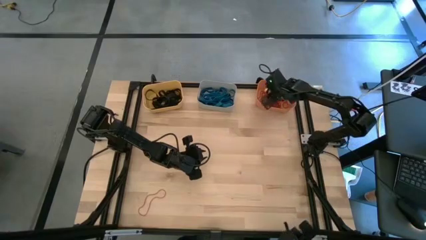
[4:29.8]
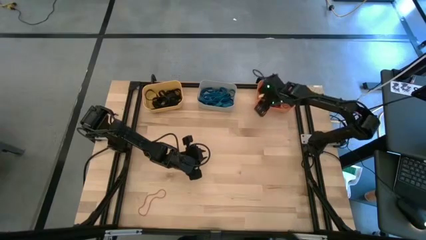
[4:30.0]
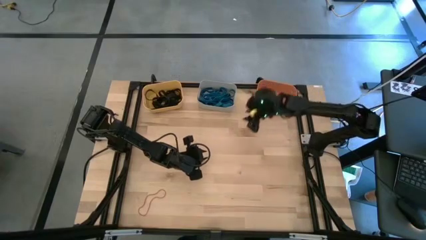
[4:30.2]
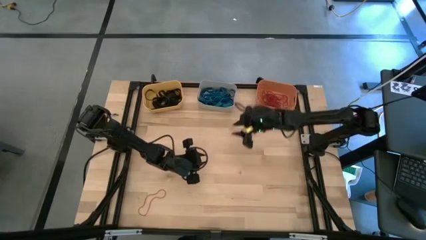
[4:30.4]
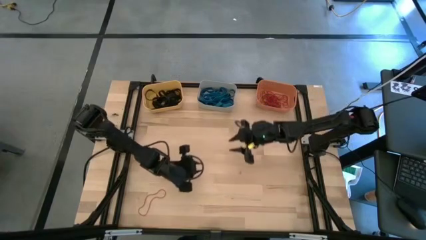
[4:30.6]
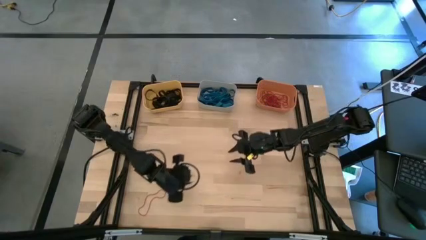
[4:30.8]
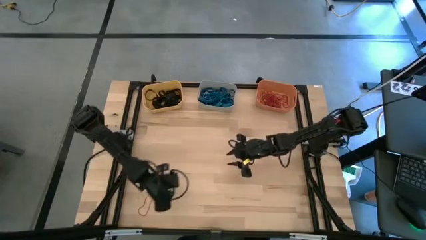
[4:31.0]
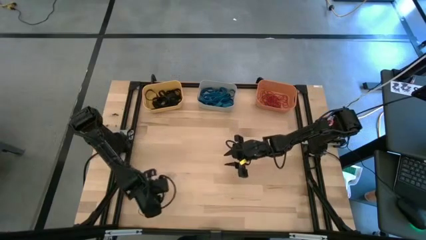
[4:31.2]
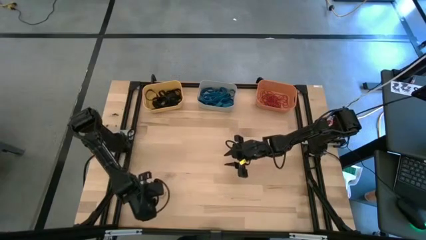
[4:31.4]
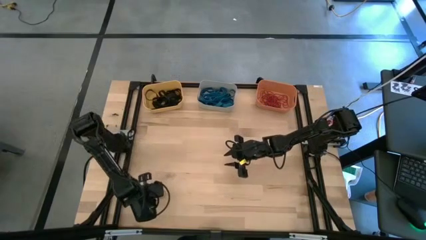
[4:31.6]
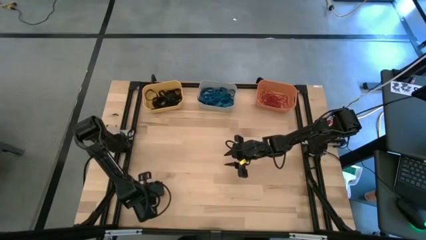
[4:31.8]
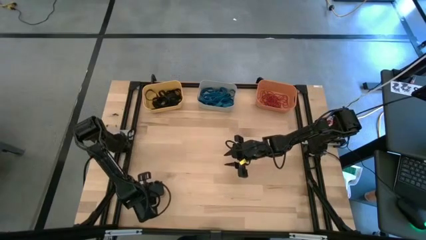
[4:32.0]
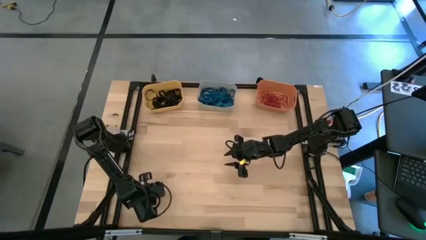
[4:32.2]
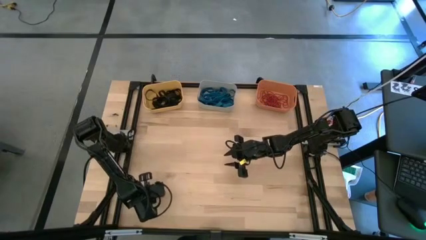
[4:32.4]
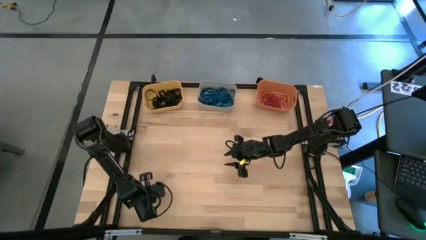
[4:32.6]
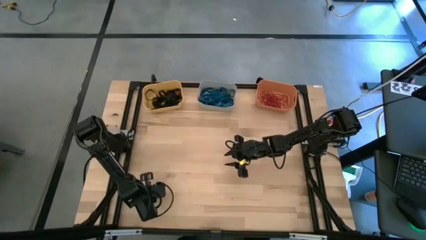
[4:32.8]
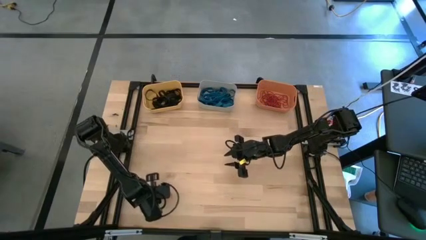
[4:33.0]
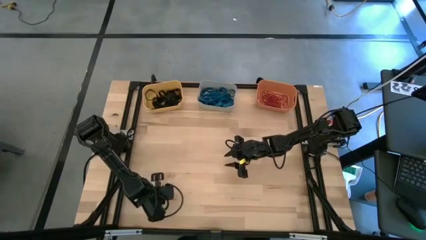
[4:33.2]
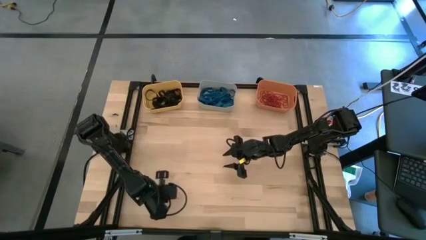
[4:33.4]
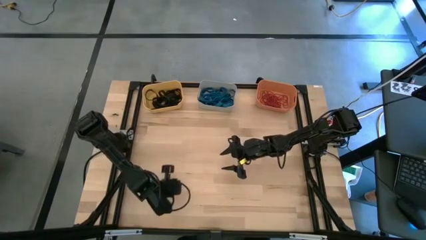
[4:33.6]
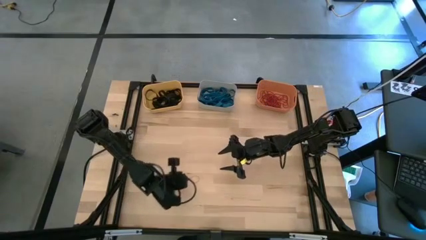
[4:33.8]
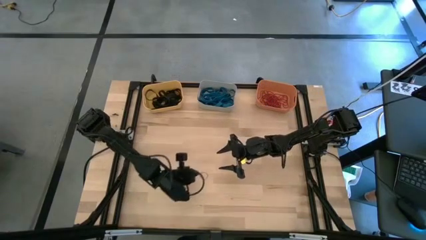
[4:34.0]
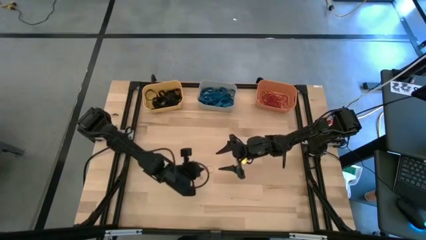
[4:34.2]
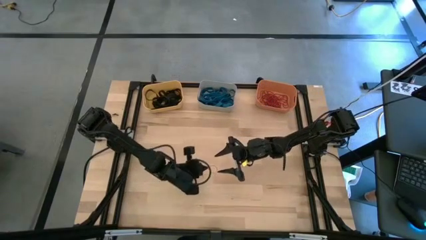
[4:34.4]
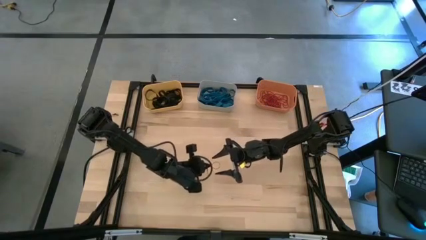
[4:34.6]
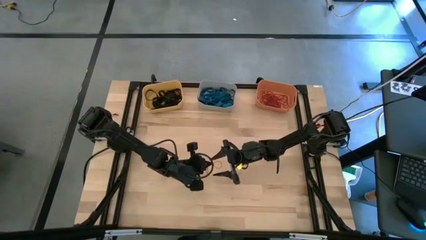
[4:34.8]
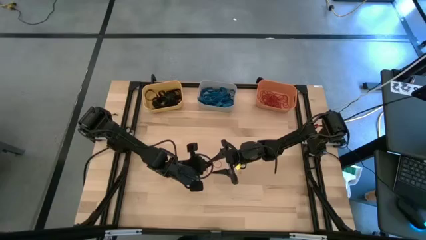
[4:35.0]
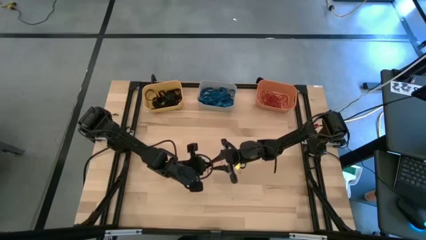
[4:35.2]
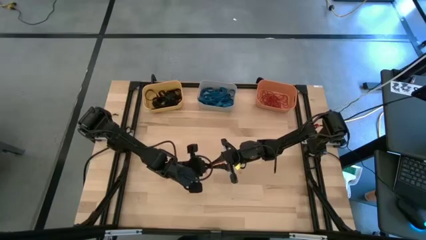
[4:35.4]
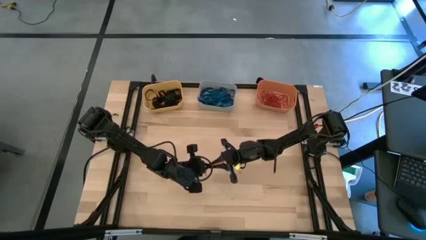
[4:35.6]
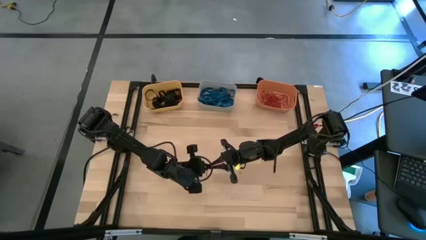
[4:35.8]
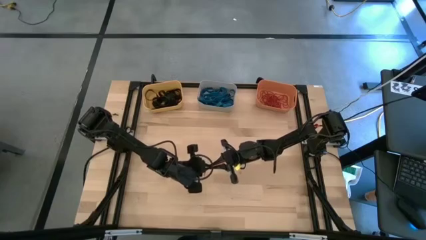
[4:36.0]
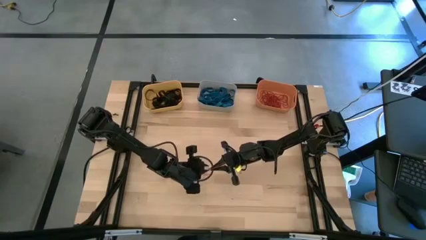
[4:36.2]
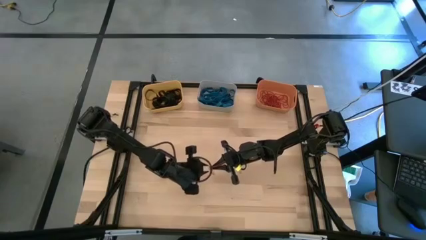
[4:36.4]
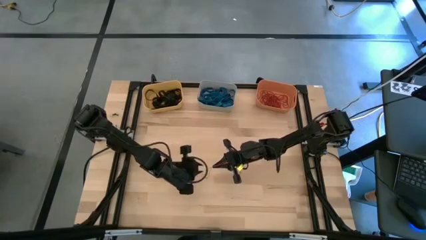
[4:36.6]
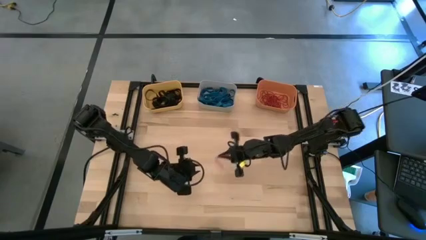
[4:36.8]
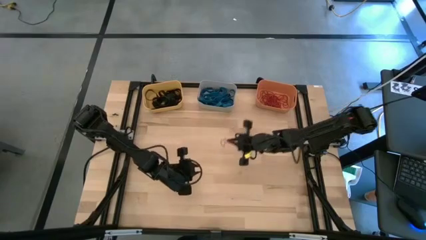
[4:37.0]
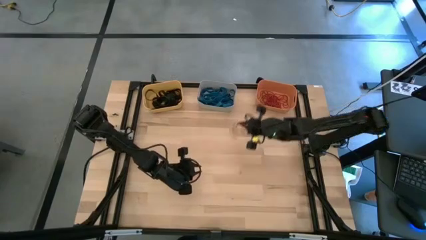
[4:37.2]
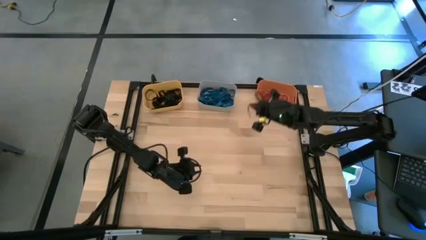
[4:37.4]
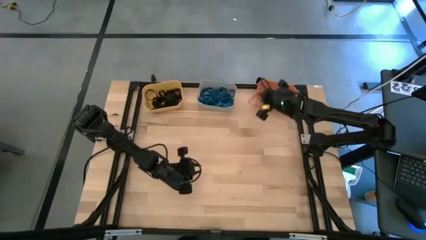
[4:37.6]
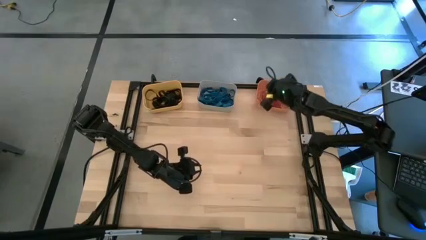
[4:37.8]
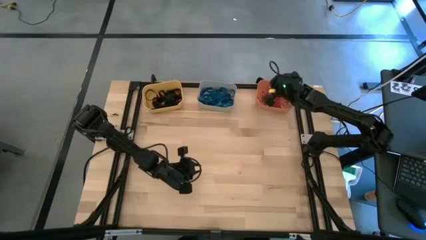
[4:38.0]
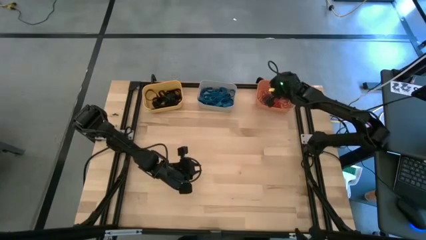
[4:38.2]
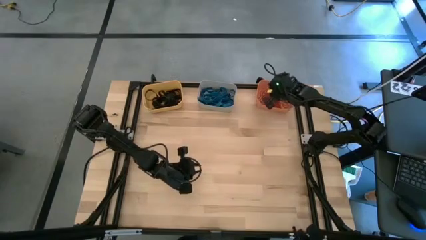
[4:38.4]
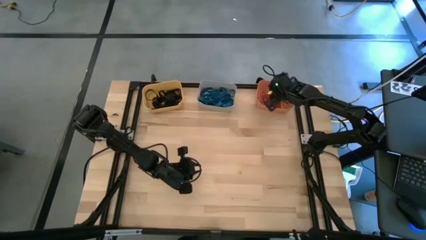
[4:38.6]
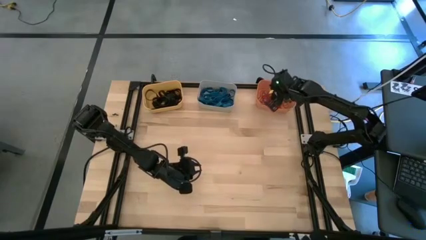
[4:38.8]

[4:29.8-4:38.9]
Task: Sort rubber bands into baskets
Put the red rubber band into the orange bin

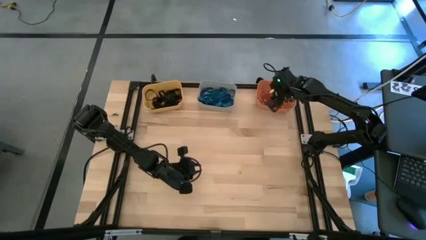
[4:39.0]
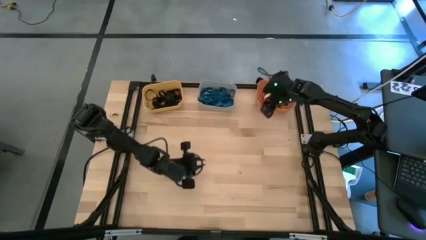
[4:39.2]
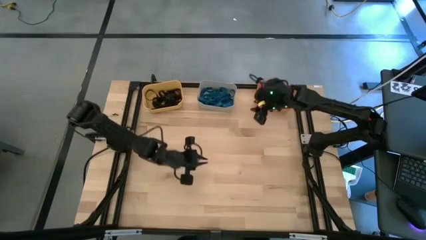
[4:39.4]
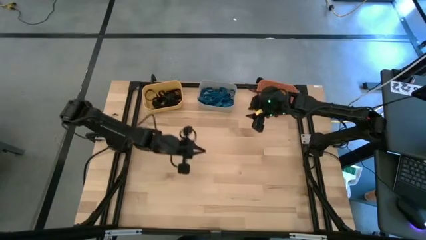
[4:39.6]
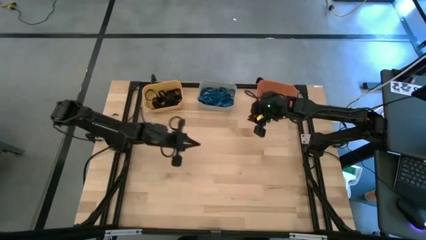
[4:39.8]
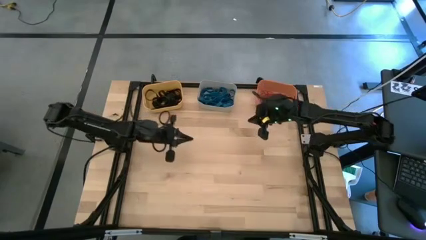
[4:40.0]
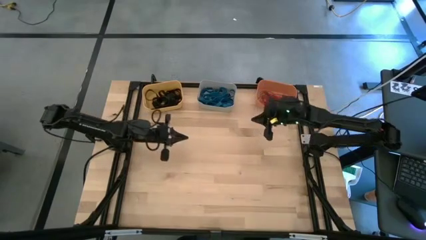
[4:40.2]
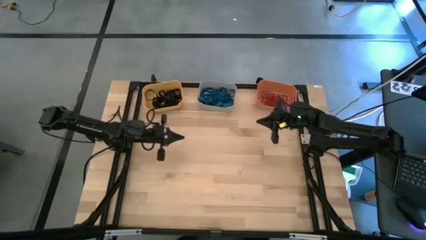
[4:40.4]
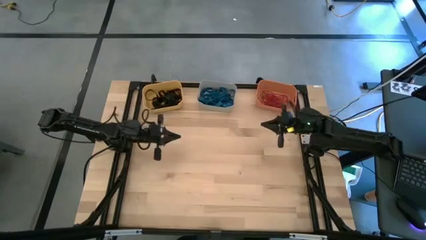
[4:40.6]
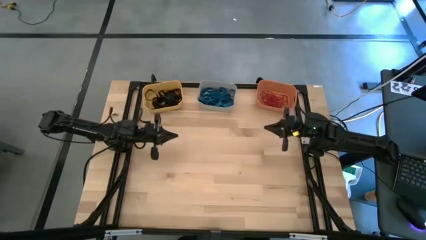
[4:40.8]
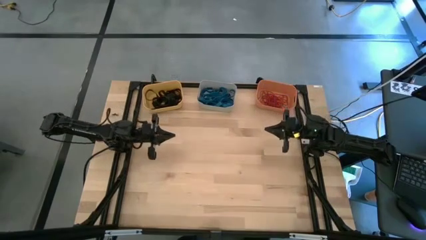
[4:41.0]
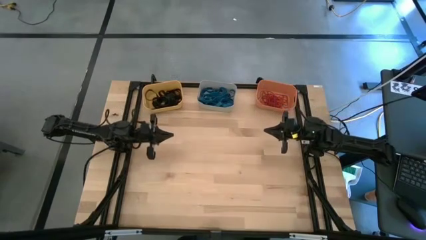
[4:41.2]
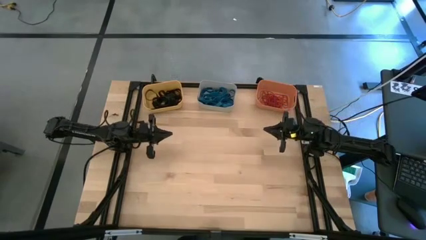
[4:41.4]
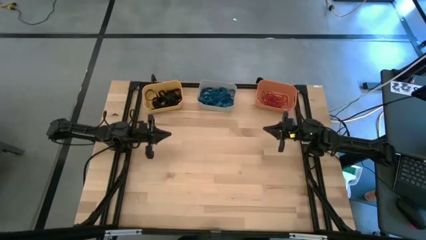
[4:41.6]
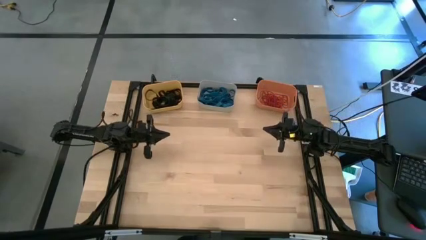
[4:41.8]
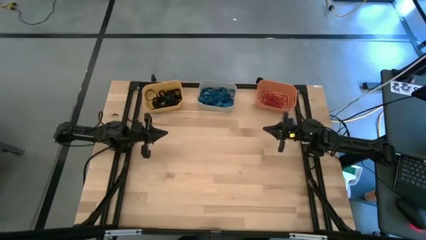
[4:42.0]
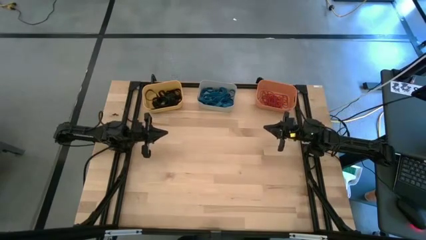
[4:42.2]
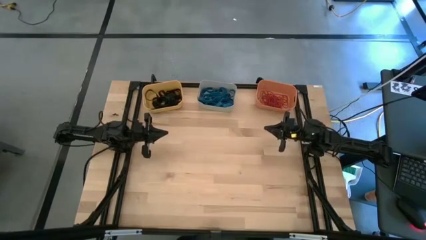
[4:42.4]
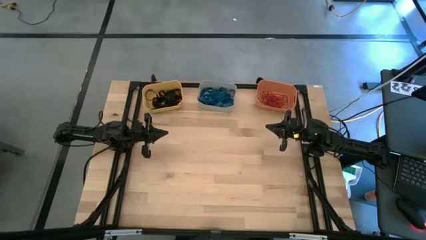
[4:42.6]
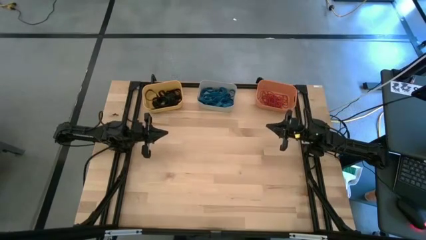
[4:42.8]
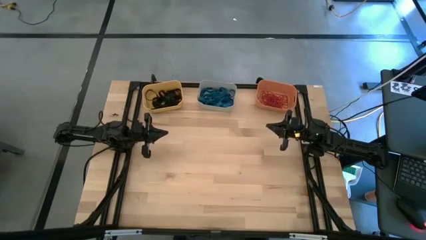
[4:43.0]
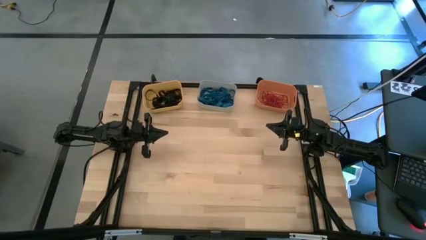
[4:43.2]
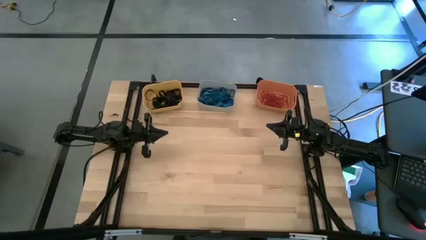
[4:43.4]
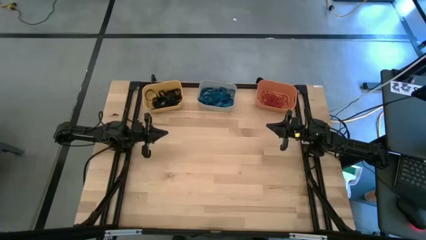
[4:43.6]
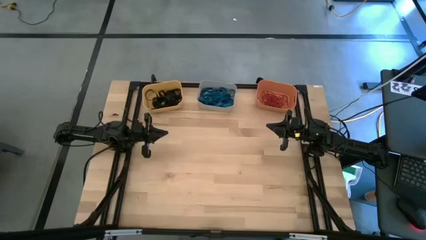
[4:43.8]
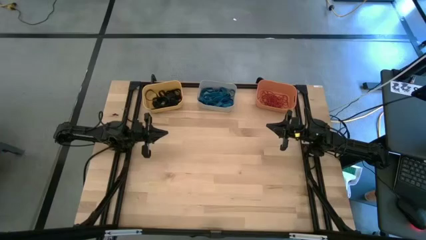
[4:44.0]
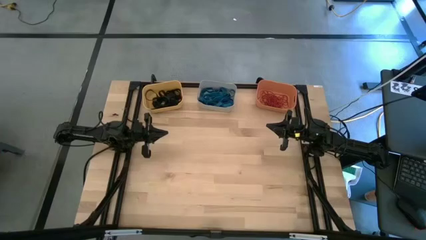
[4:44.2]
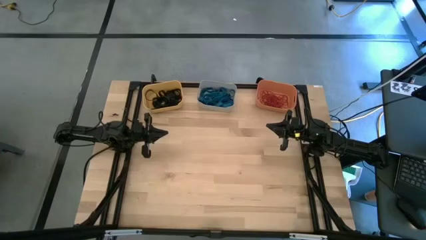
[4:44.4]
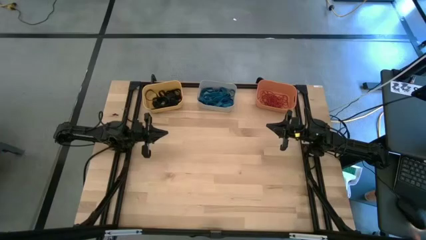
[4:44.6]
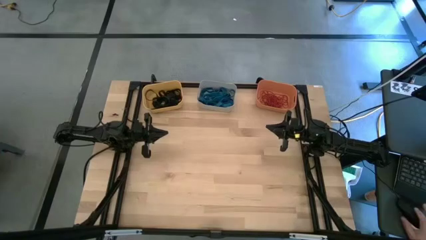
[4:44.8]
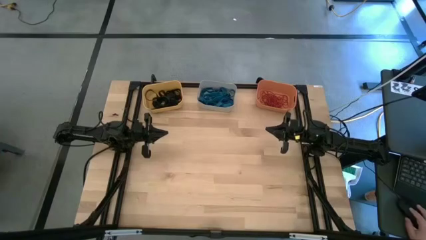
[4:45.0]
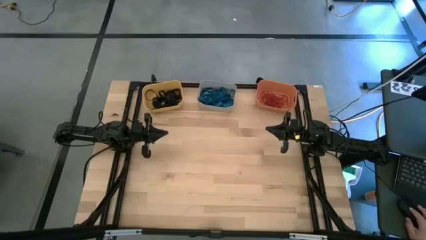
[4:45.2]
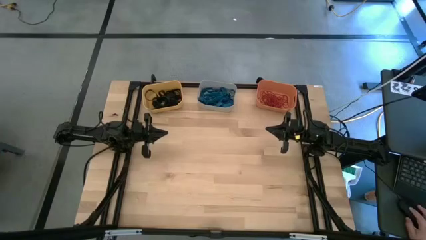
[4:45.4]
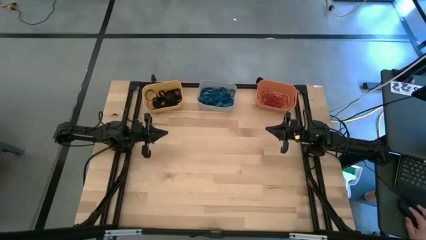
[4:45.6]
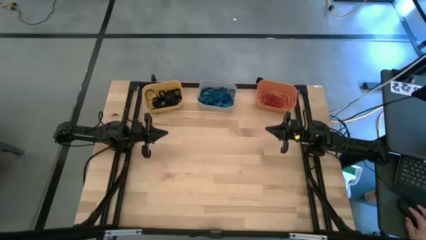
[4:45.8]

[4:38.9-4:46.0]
Return to Home Position

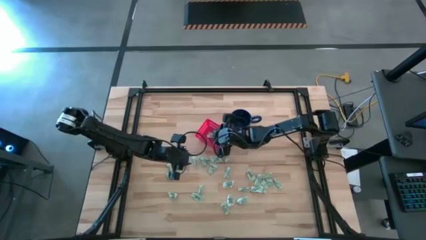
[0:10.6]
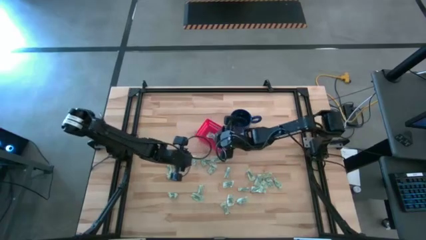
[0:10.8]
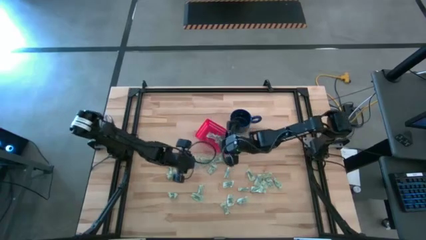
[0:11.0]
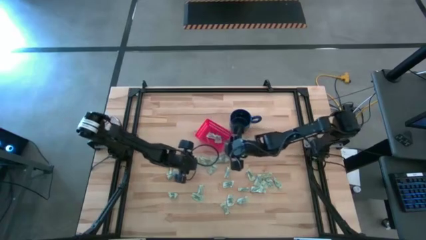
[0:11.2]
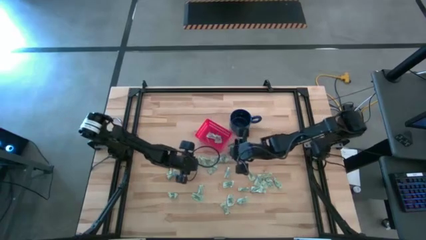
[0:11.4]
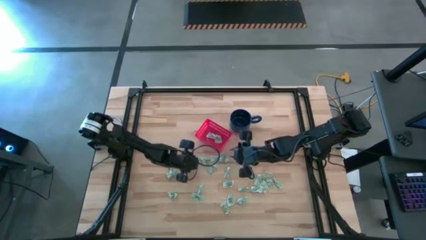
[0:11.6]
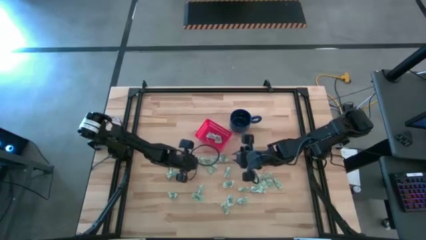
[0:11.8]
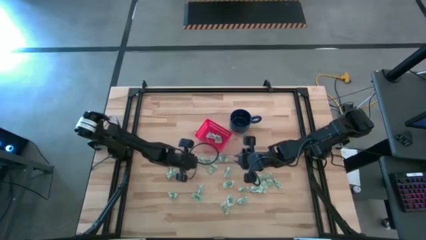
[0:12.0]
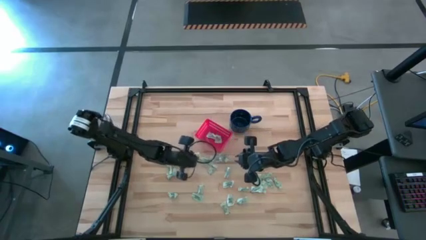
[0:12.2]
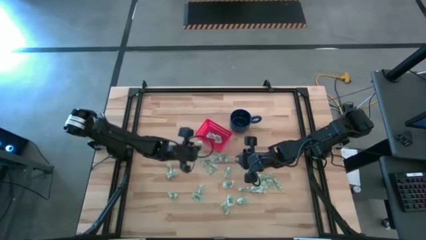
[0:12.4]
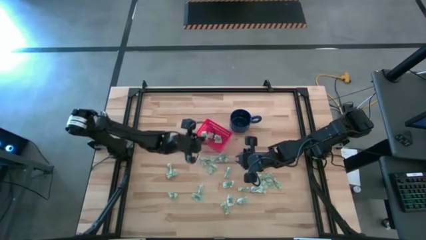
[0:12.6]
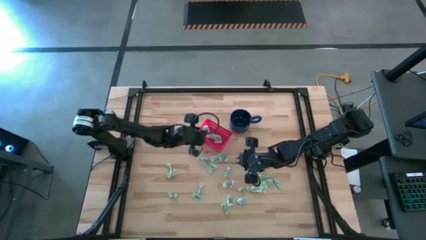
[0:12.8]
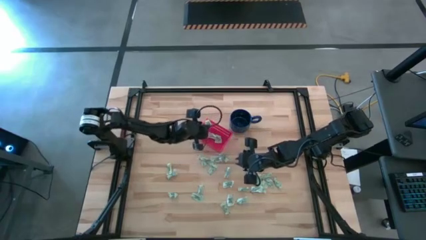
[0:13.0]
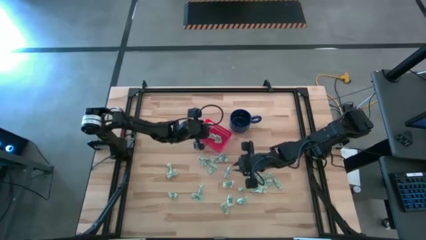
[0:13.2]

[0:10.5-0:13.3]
Task: Pick and place items into bin
Put the stevia packet into the bin
